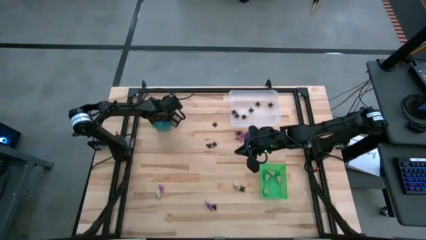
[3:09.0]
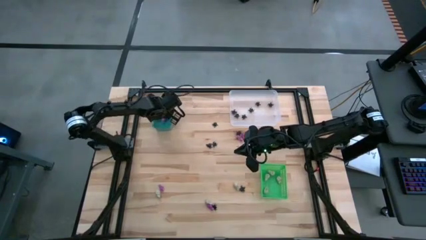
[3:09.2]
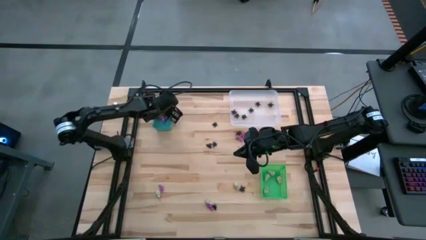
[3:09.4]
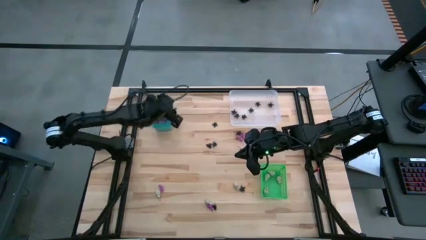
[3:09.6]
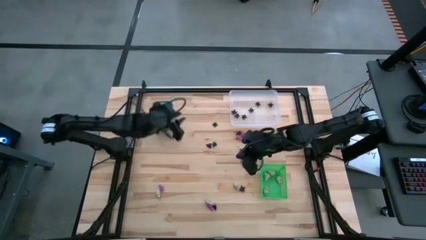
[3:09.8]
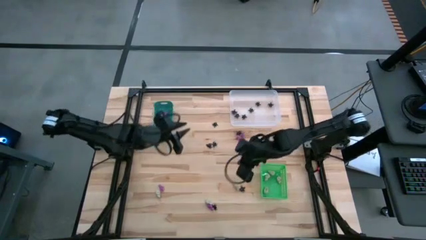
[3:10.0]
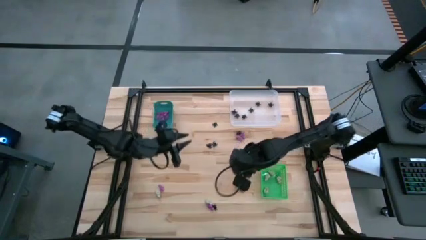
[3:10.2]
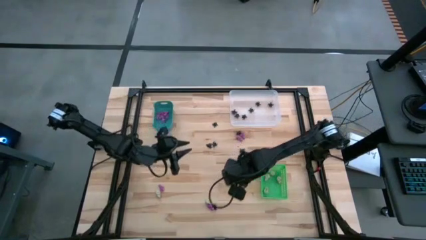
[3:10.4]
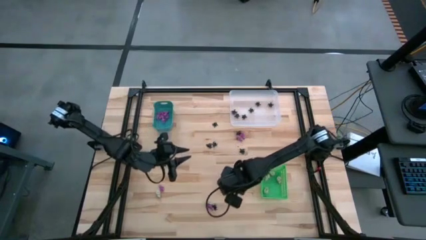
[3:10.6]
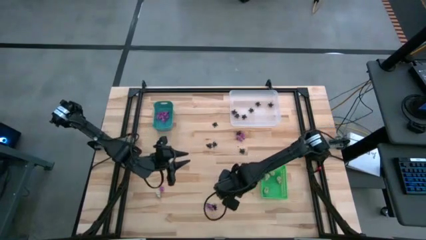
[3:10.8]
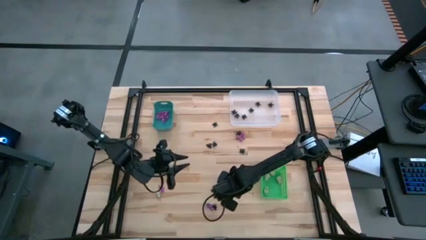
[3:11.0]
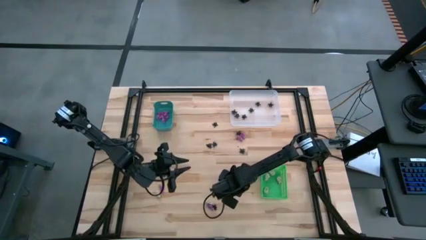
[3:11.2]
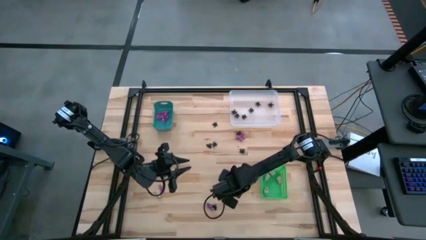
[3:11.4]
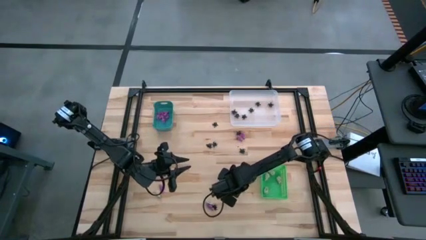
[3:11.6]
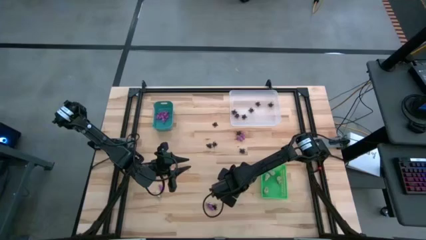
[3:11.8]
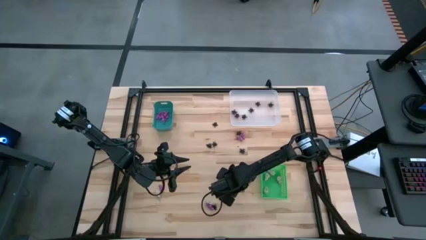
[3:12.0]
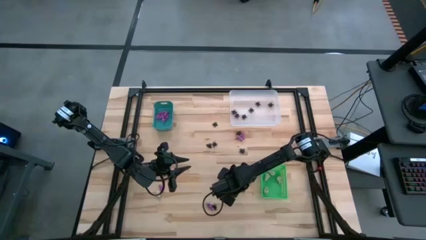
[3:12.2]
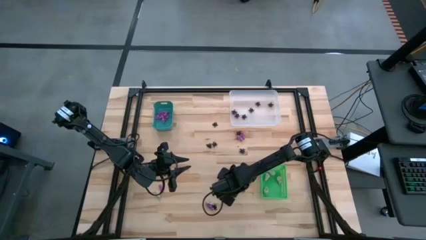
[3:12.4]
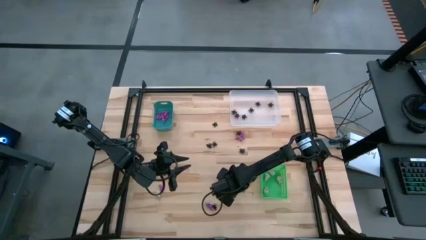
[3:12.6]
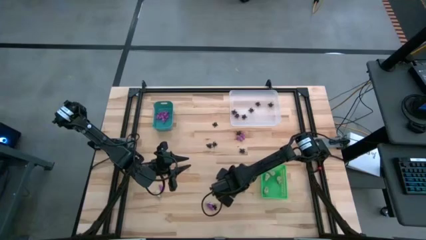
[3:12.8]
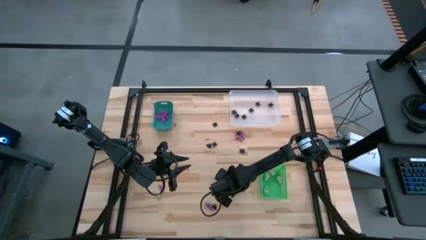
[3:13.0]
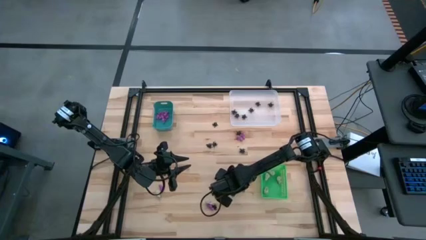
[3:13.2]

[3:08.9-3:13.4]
Task: Sort Halloween decoration
Put the white skull toy into the green bin

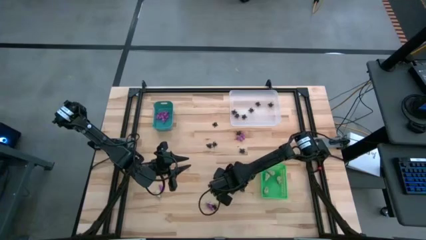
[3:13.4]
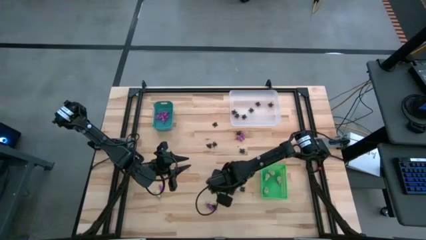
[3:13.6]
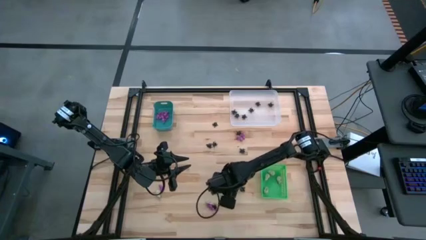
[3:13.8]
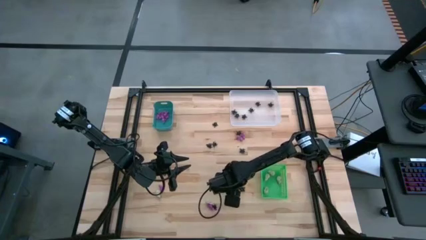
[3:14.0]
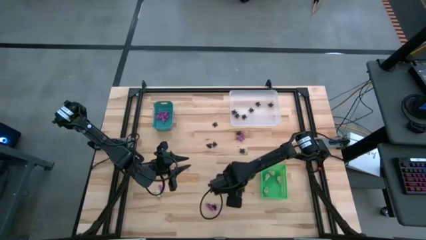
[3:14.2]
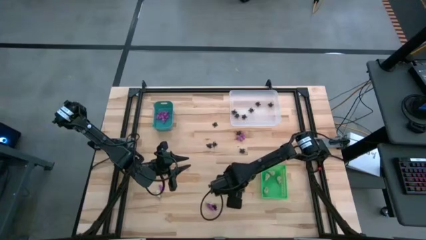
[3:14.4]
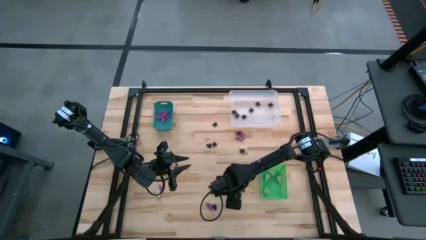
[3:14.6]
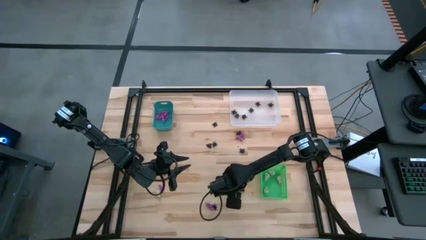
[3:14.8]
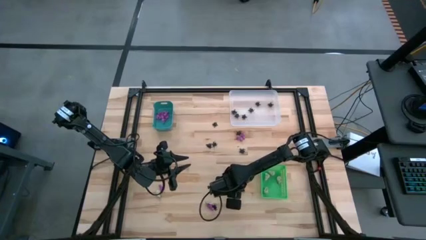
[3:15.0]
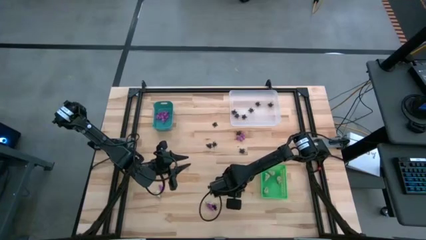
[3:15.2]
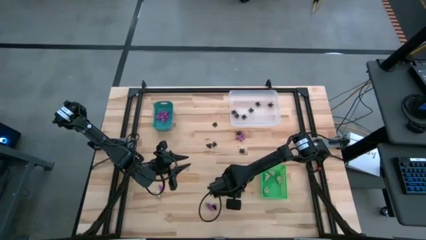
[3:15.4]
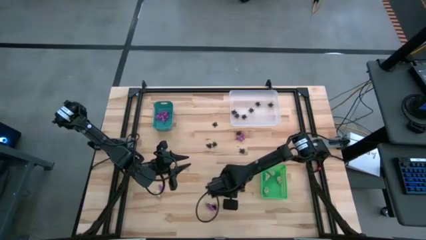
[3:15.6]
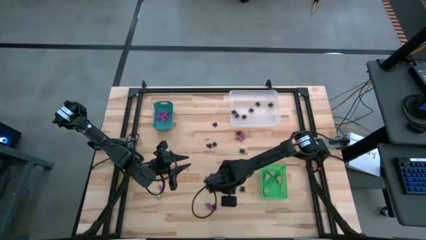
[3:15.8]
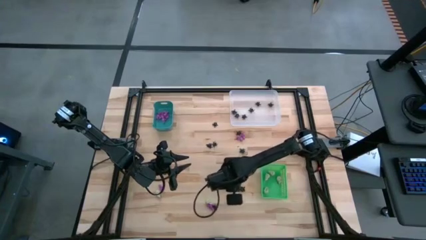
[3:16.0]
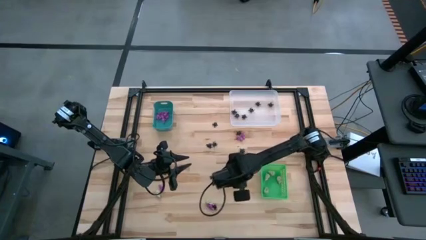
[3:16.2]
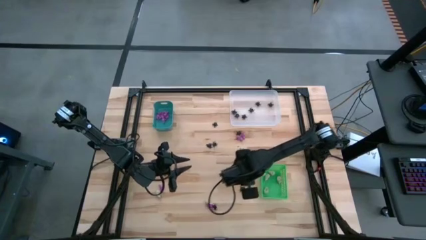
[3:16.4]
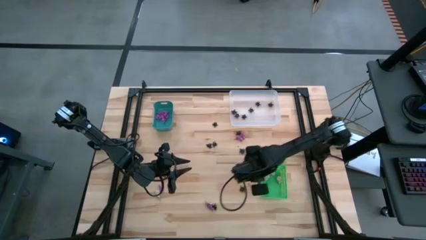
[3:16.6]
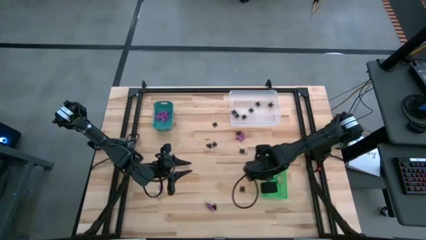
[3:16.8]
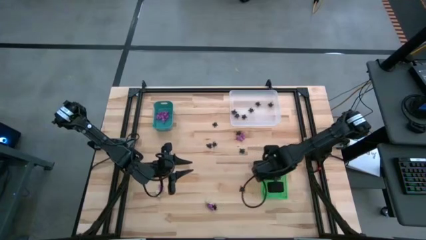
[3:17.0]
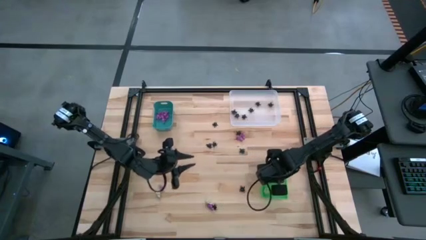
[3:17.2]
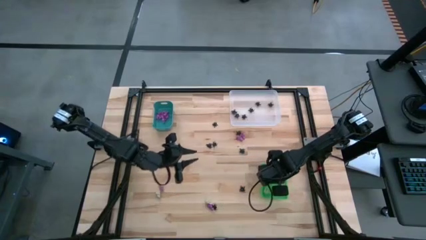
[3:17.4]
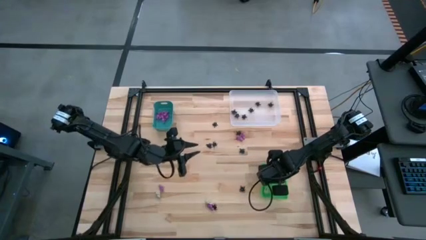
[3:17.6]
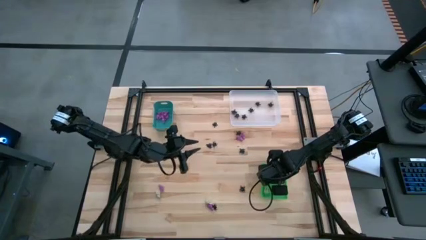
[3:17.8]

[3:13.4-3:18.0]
Put the white skull toy into the green bin

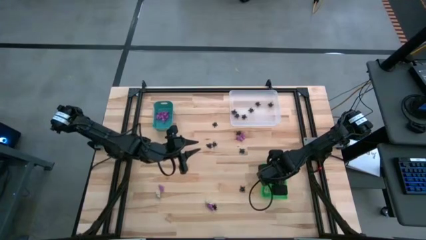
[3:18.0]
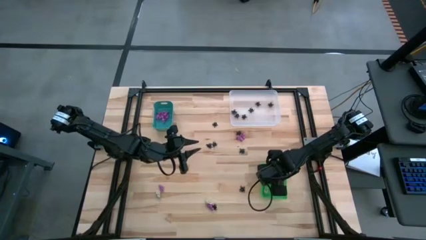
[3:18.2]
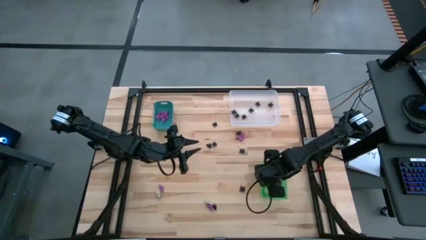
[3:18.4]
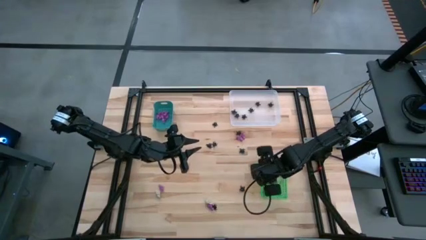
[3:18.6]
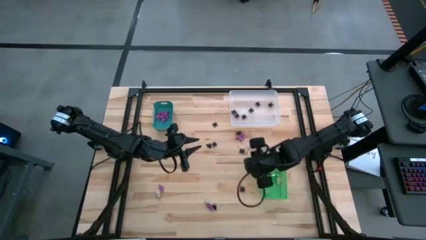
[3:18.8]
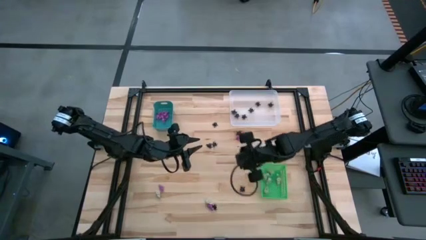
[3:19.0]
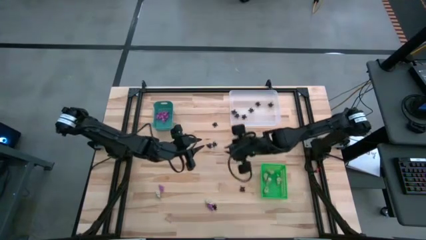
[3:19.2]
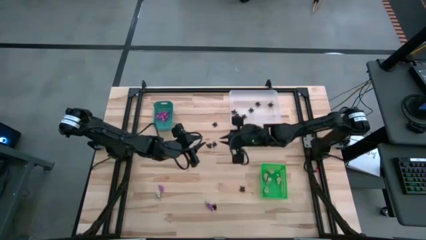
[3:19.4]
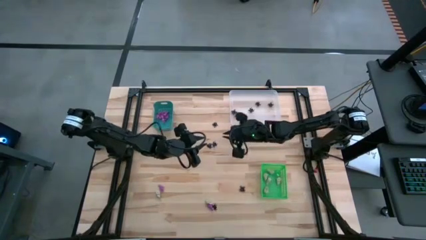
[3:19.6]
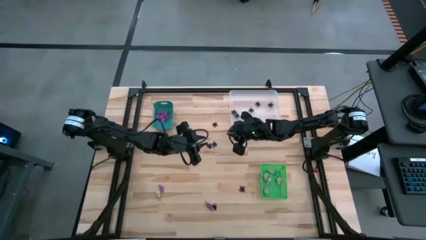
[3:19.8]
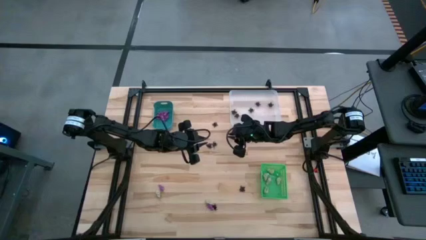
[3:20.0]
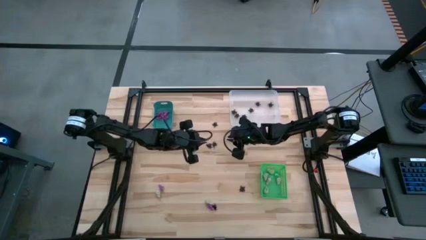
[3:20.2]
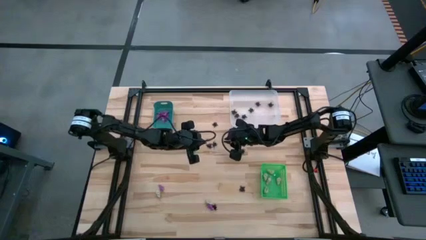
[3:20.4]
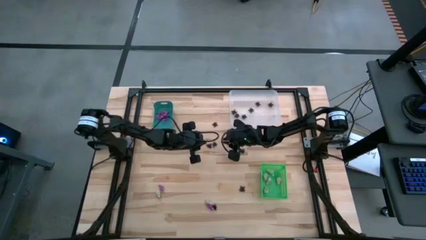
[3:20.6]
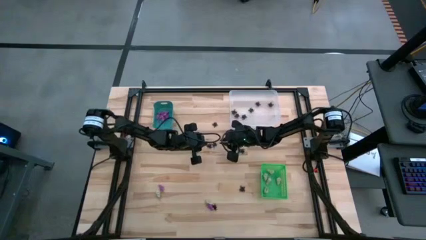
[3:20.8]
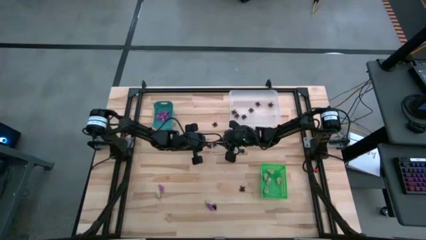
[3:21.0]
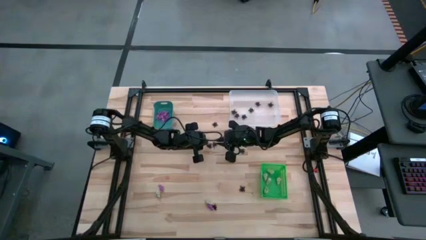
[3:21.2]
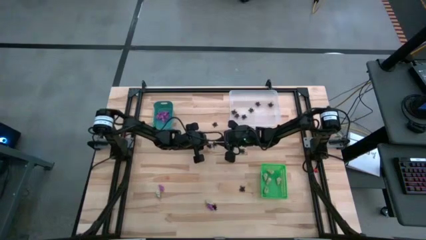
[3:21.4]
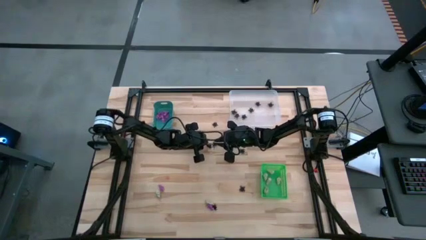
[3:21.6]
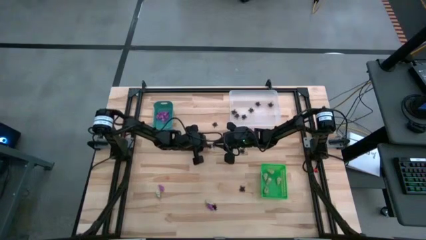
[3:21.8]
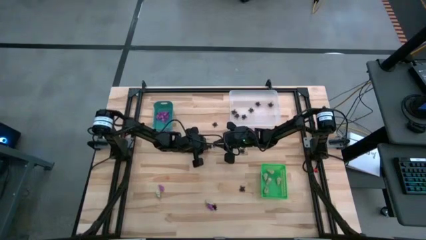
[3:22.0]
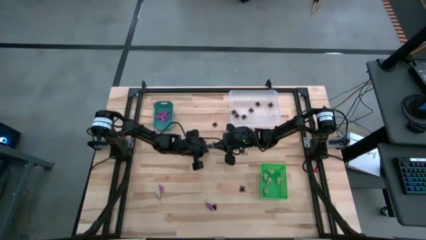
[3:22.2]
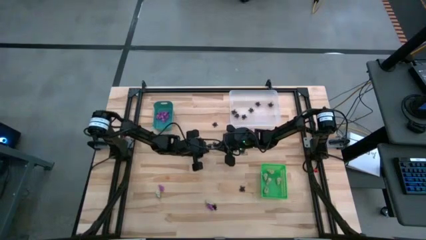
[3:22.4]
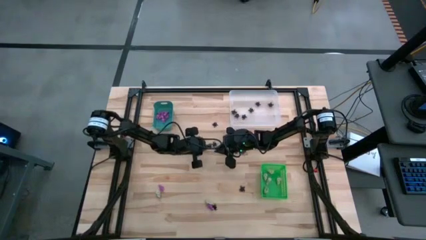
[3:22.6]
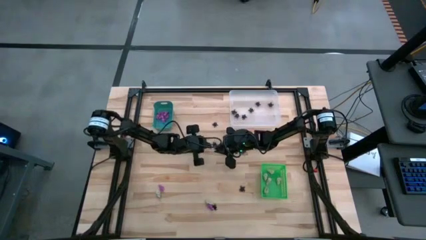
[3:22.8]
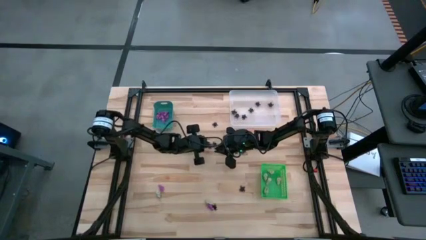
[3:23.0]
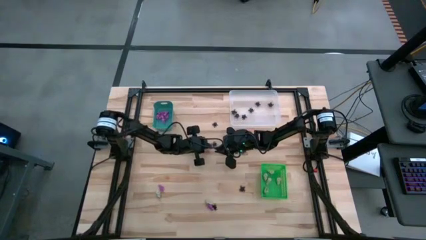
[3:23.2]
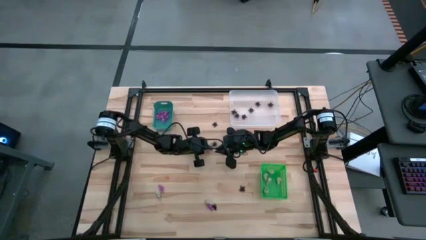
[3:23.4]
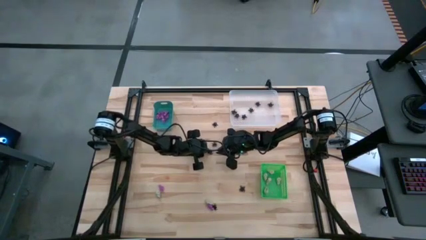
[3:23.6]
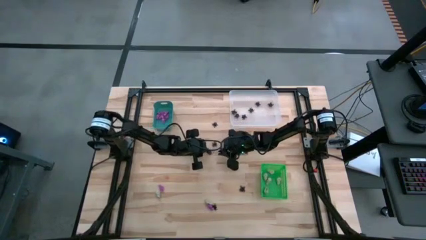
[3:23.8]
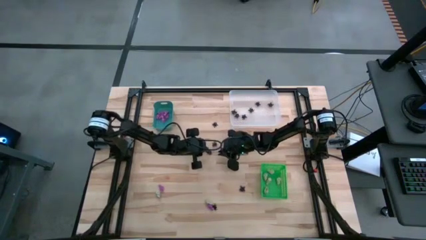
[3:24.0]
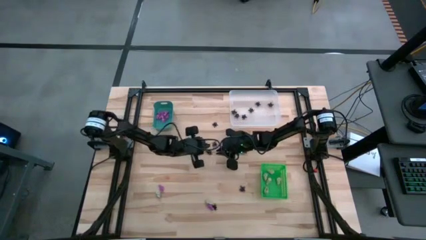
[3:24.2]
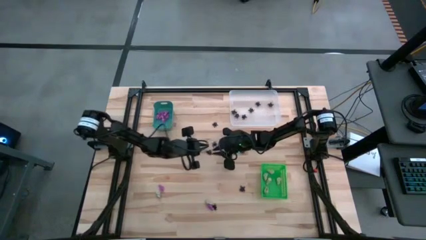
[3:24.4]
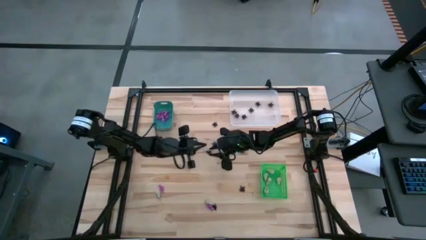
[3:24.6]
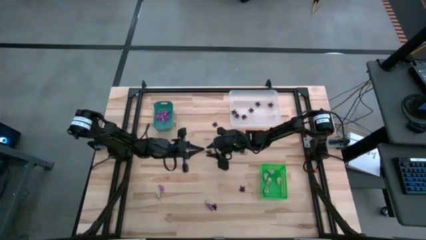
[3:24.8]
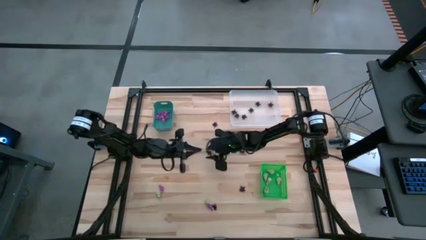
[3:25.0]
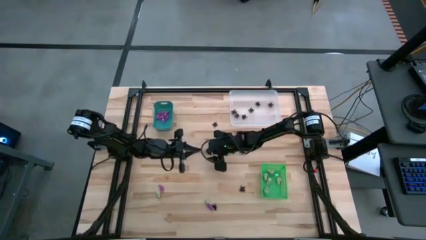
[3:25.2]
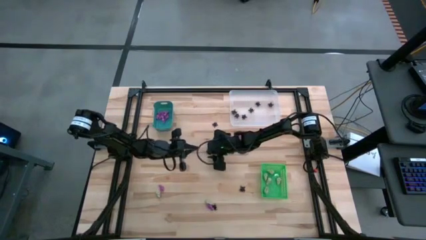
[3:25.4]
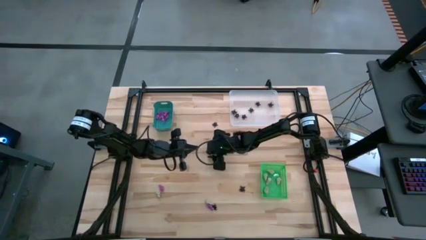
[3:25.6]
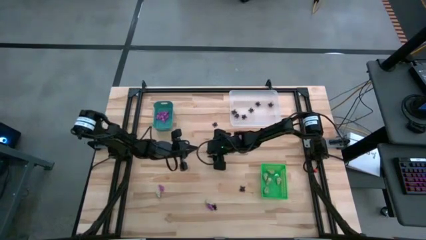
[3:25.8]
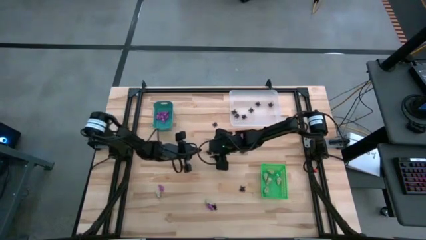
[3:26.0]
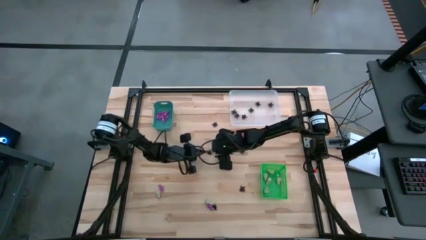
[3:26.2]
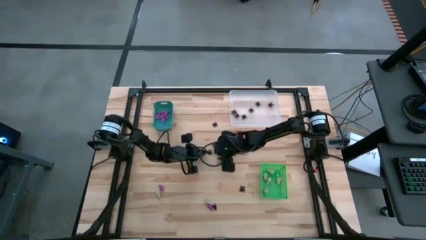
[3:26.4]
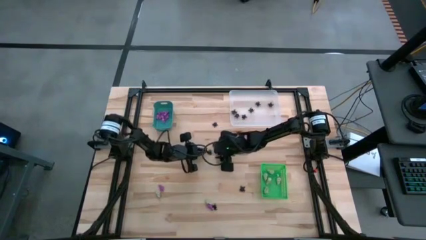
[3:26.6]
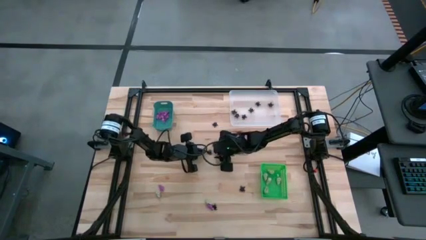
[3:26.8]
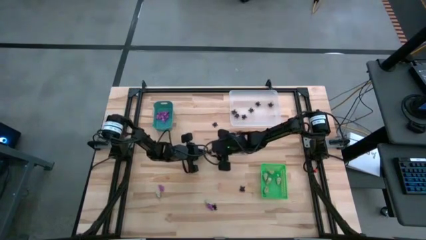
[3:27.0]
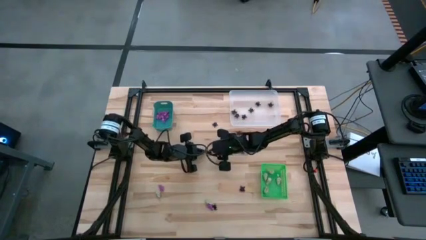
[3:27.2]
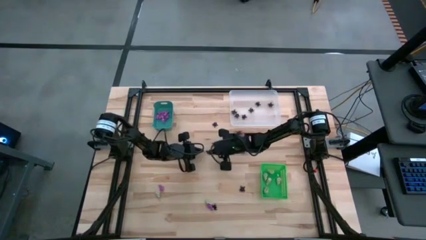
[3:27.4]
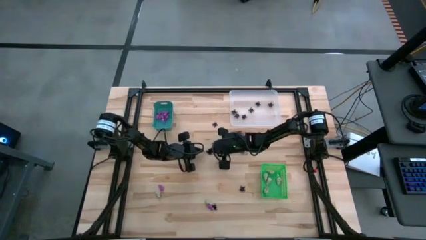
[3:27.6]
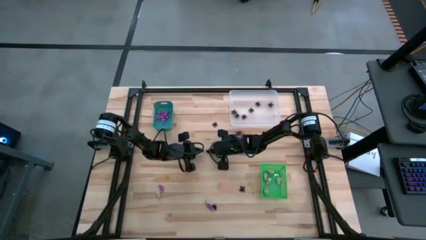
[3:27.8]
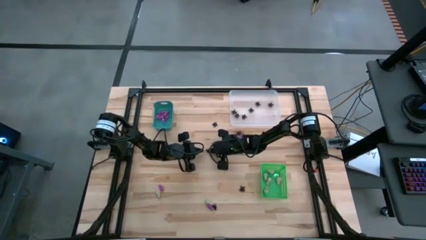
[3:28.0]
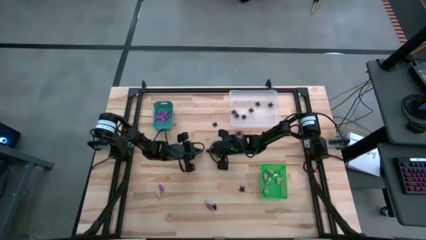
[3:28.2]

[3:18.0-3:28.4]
Put the black spider toy into the white bin
